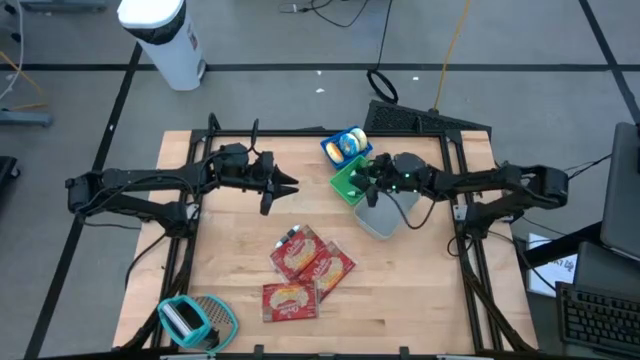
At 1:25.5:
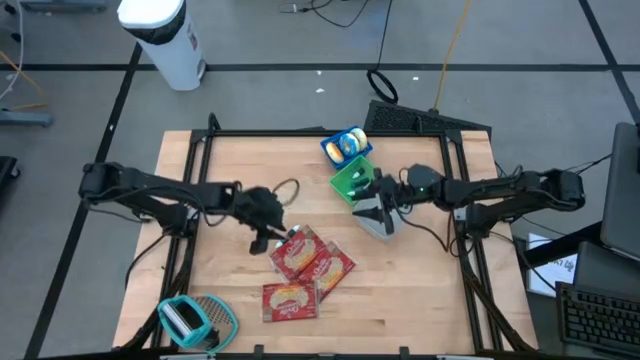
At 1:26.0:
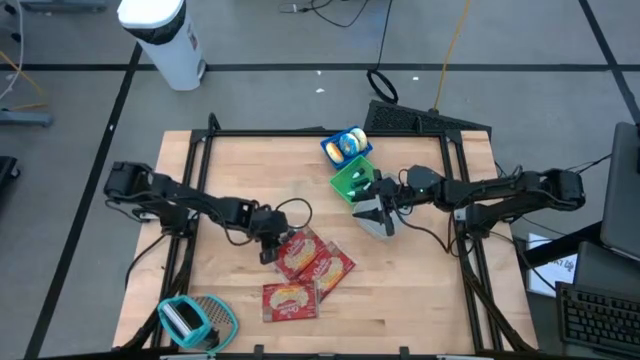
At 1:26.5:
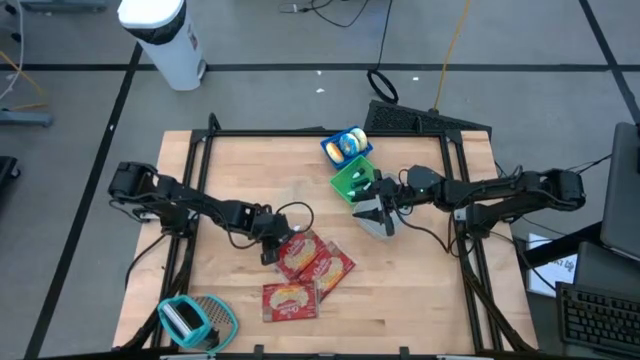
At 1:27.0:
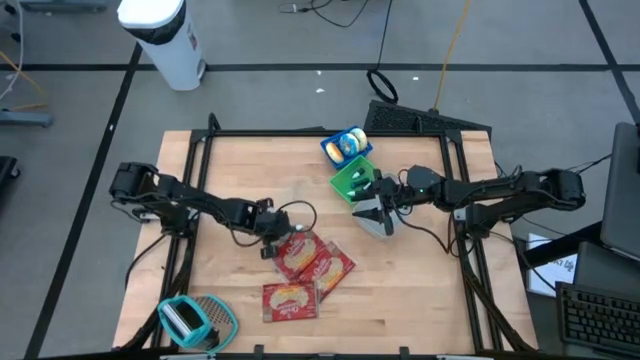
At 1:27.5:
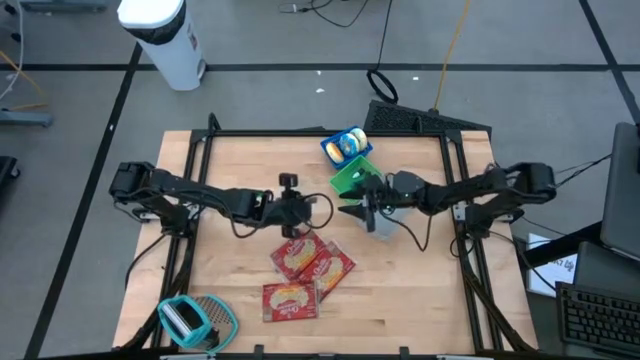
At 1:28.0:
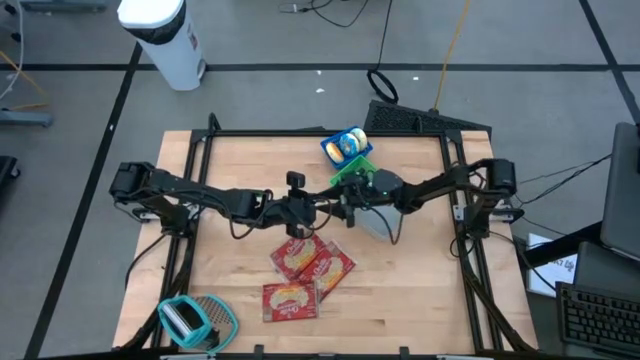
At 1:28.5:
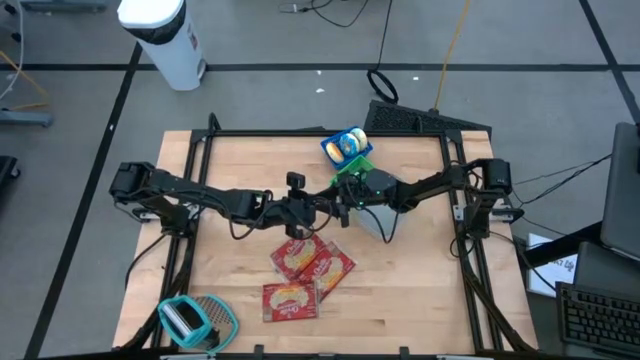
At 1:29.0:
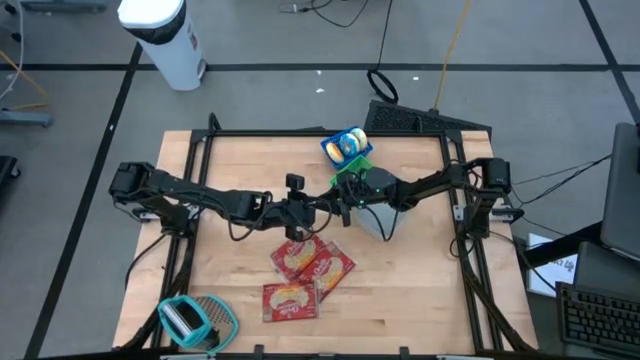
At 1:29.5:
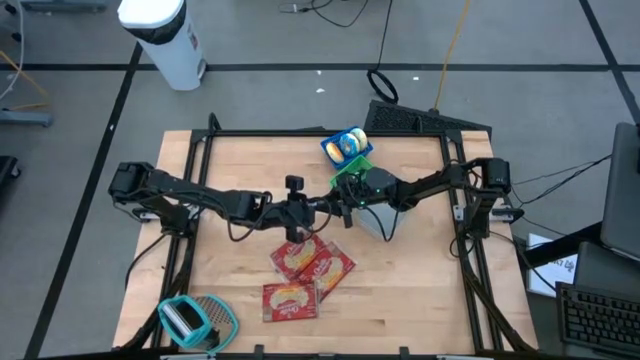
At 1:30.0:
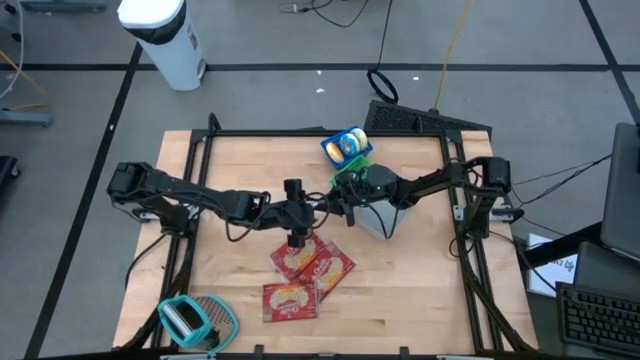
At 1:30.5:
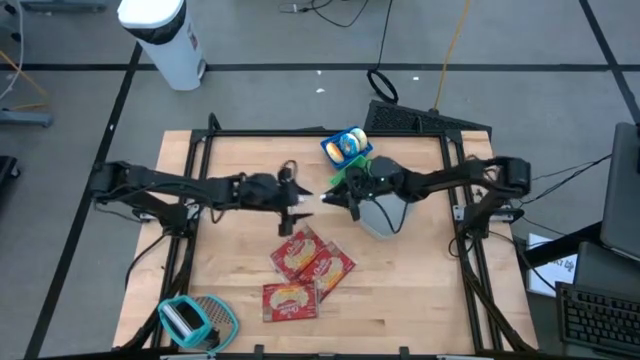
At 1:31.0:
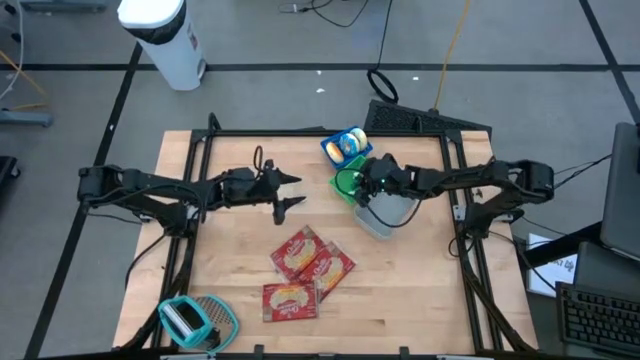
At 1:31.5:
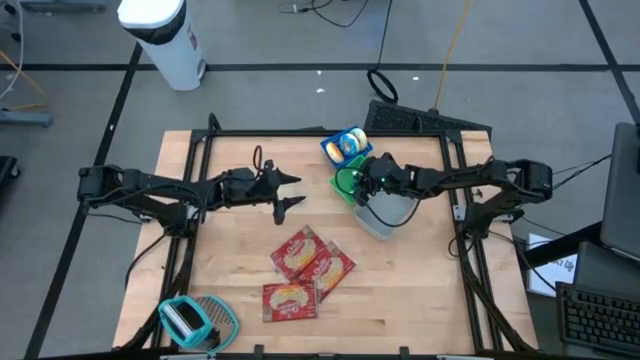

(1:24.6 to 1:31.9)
Put the bottom small green food coloring bottle into the green bin

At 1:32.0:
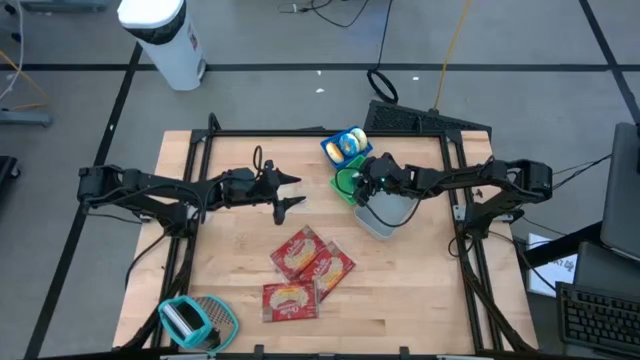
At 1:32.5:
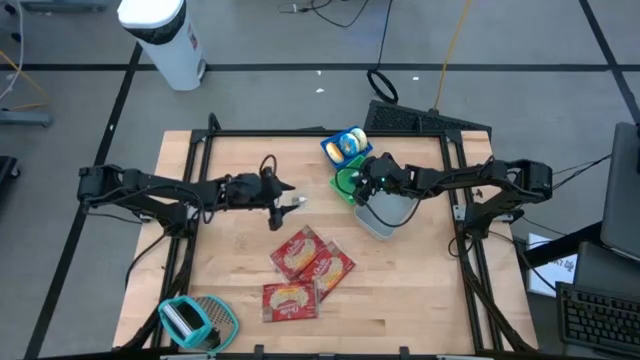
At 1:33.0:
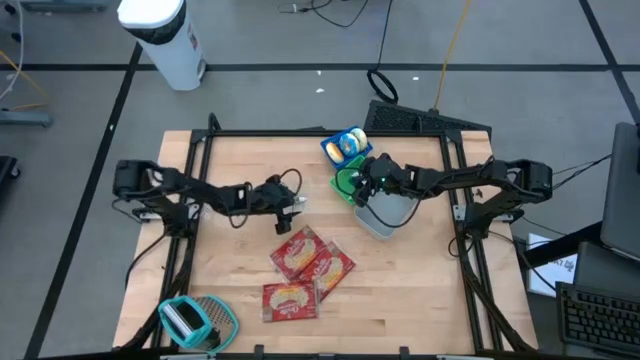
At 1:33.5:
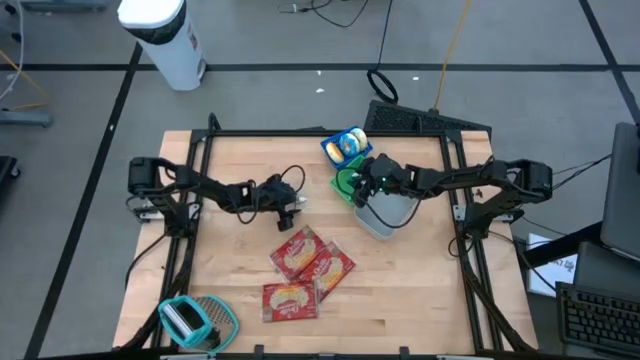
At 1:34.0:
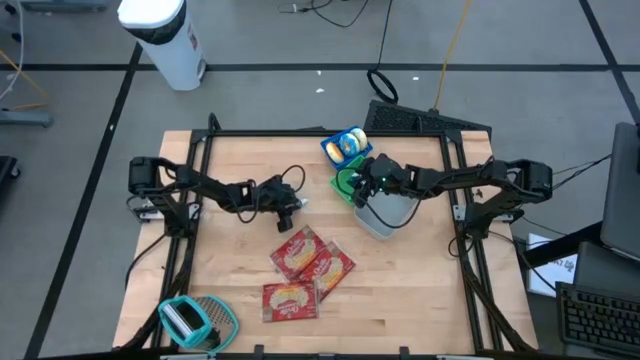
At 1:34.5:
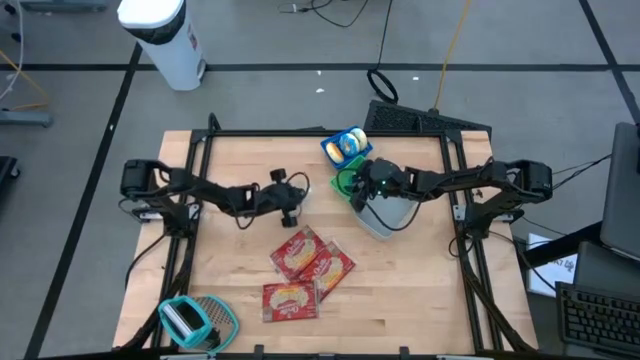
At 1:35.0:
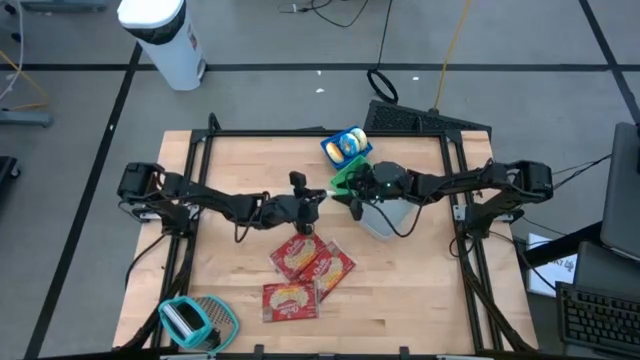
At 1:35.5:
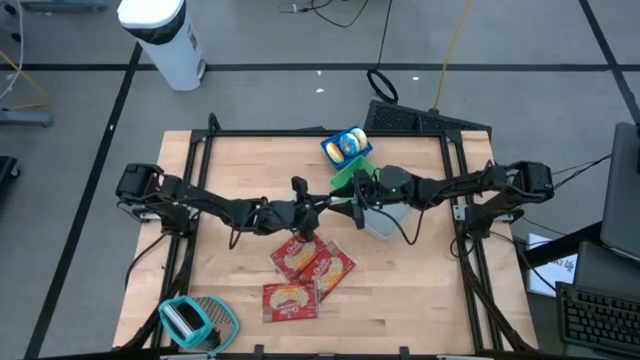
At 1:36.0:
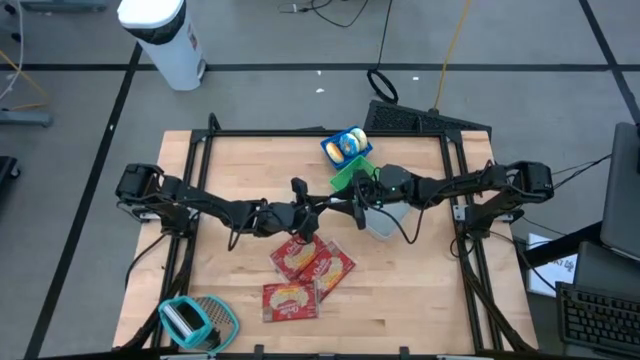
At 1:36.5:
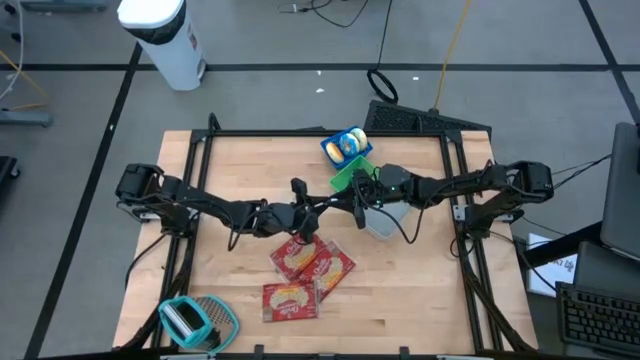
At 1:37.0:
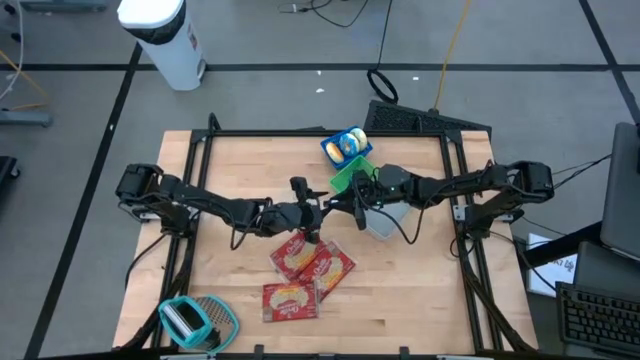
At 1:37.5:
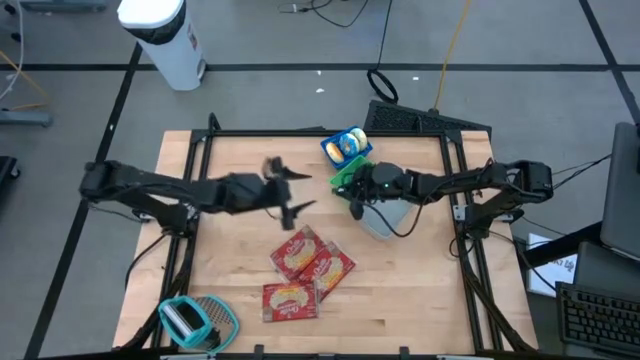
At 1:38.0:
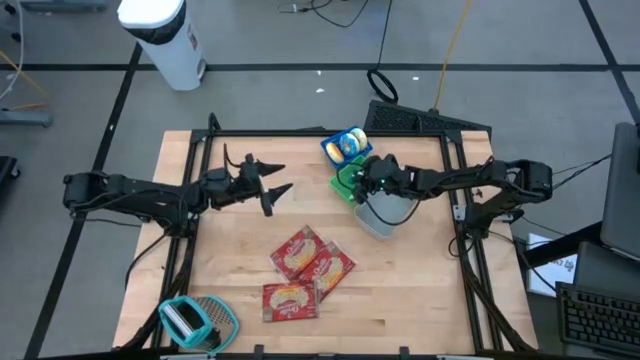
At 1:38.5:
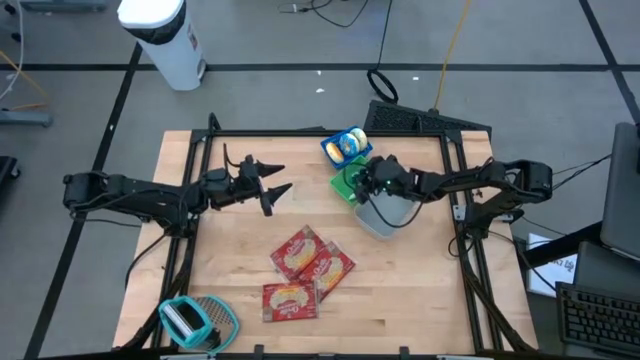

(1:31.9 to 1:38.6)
Put the green food coloring bottle into the green bin

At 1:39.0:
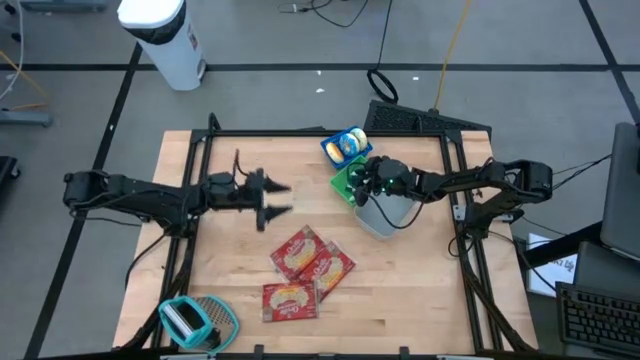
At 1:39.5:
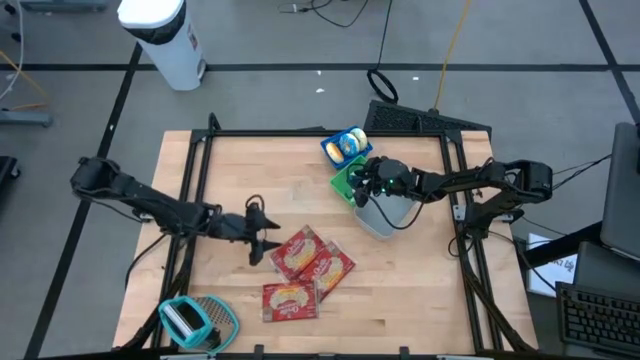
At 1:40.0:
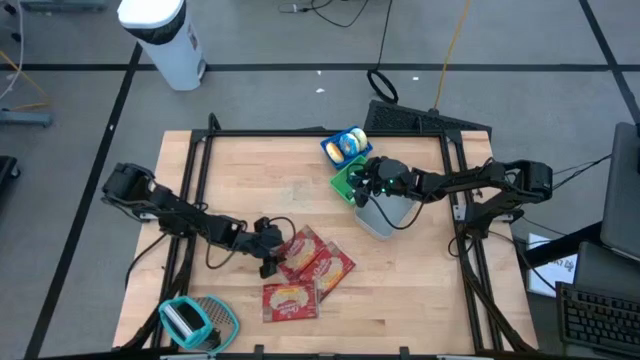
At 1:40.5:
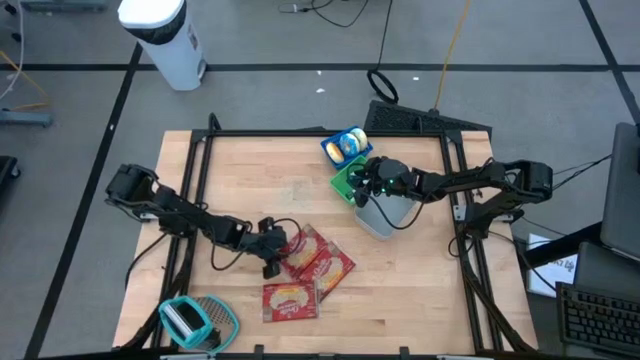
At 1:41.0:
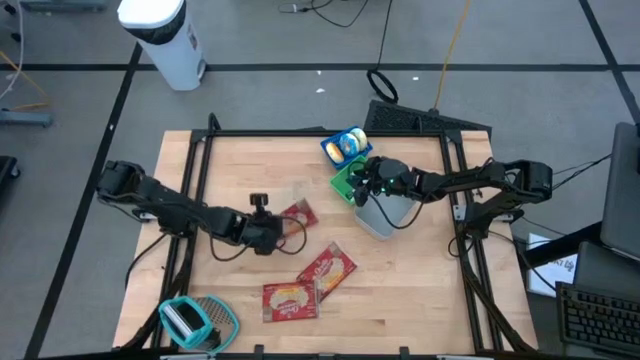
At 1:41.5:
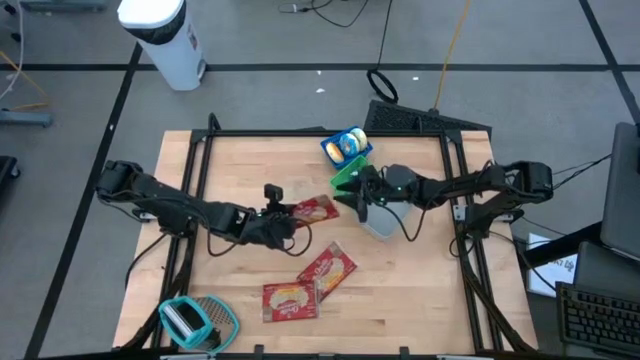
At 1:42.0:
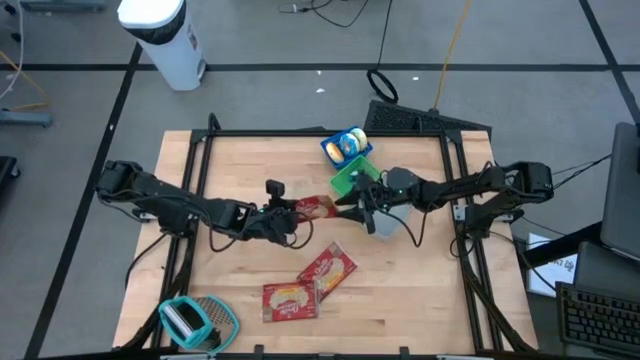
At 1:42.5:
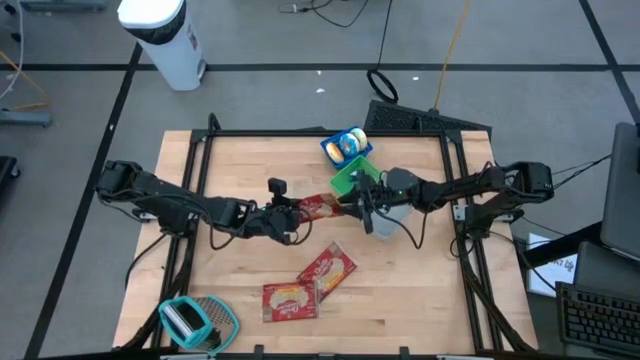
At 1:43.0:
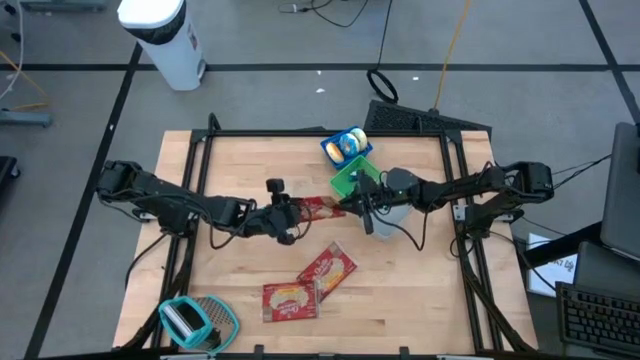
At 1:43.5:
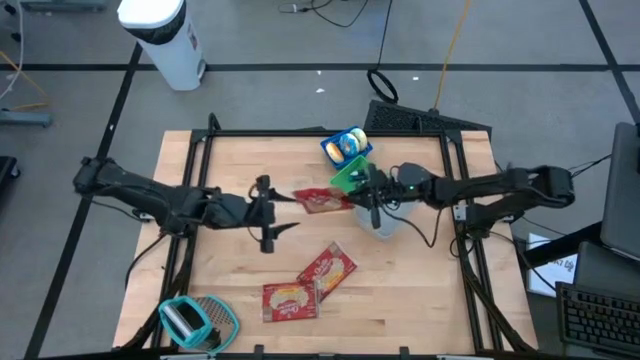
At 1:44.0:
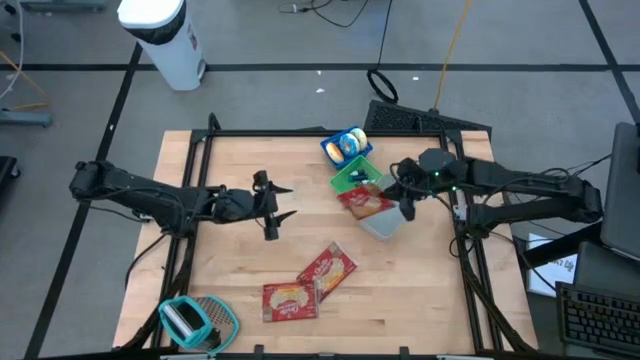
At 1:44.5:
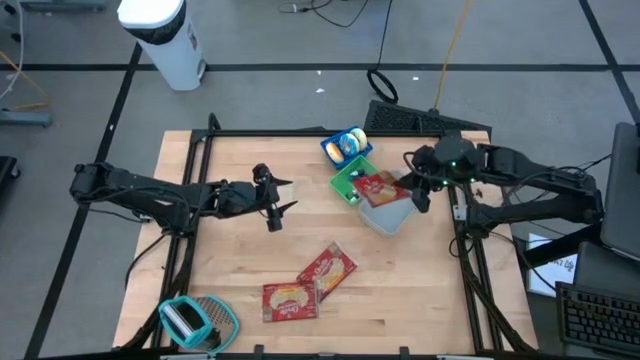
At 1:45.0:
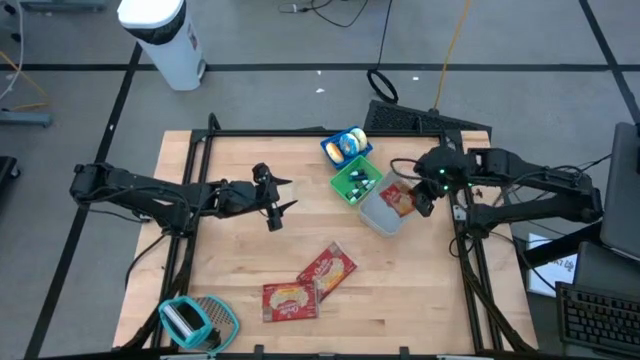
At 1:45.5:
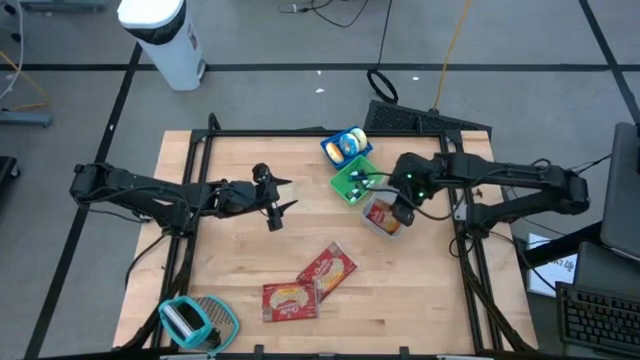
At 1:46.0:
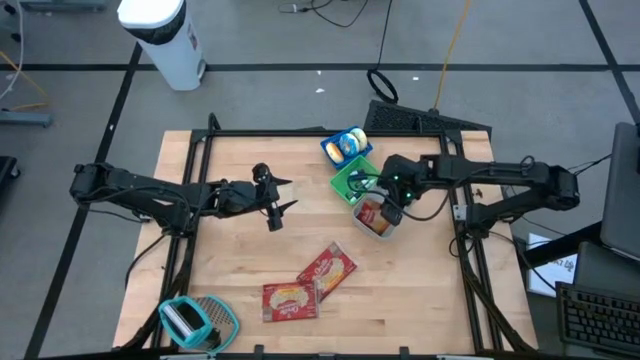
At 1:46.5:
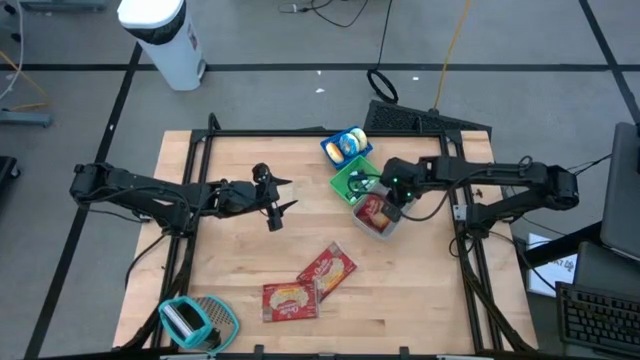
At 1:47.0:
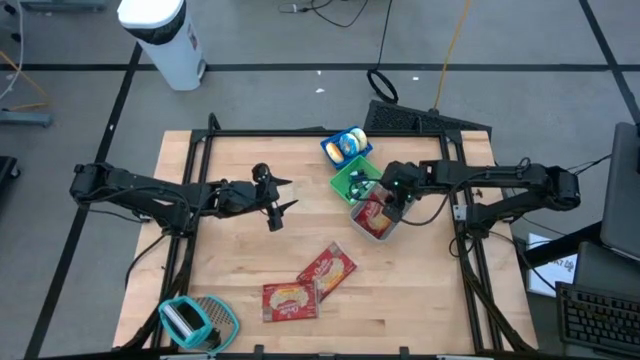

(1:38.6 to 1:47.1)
Put the top red popcorn bag into the gray bin
